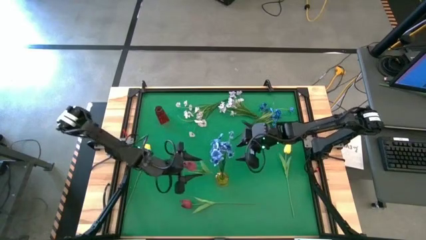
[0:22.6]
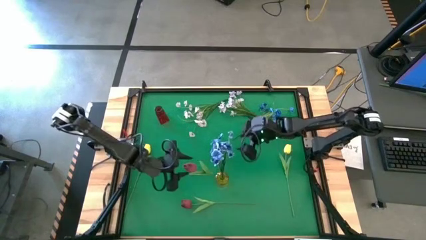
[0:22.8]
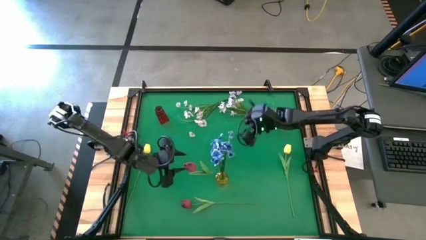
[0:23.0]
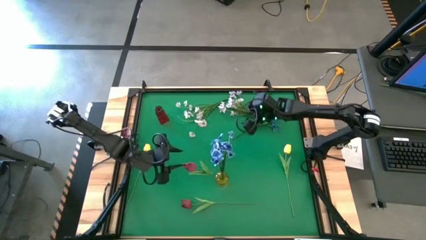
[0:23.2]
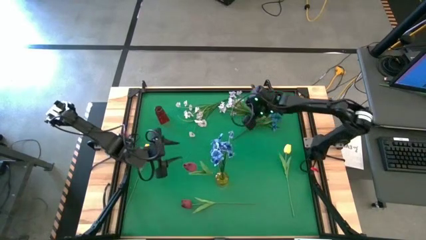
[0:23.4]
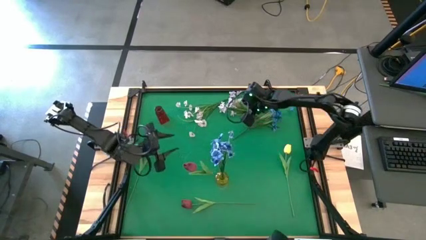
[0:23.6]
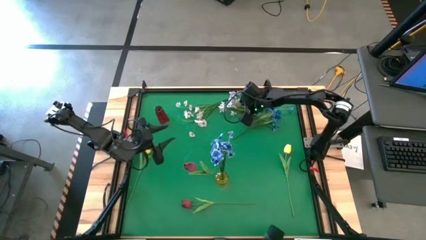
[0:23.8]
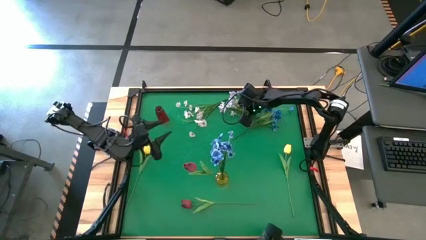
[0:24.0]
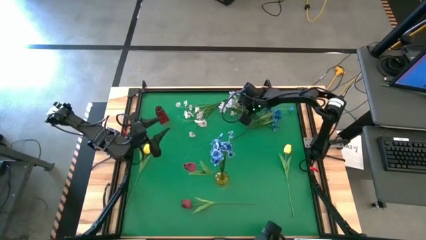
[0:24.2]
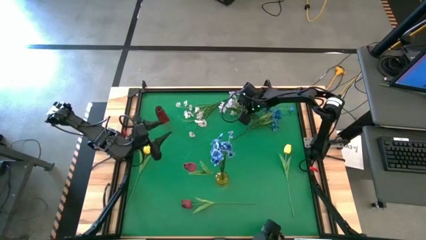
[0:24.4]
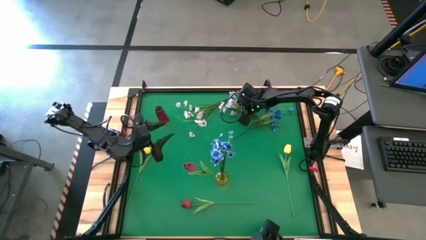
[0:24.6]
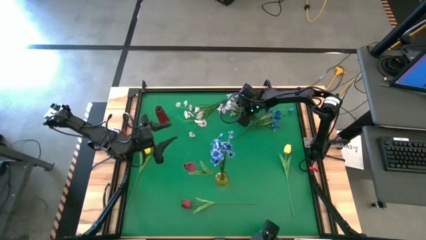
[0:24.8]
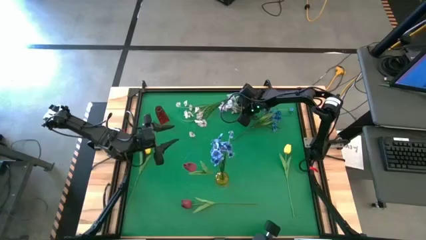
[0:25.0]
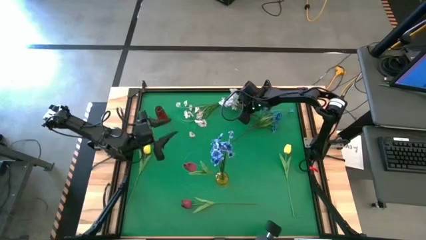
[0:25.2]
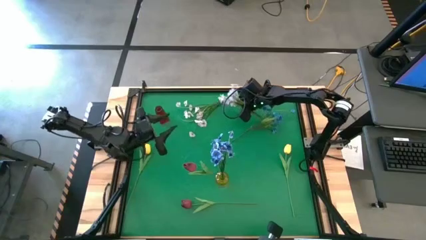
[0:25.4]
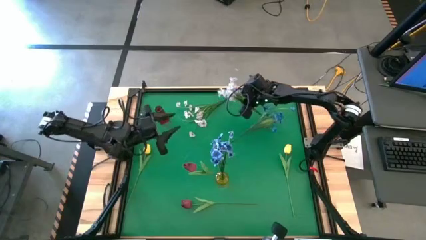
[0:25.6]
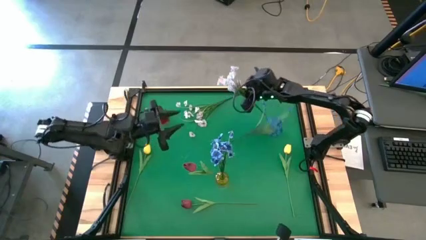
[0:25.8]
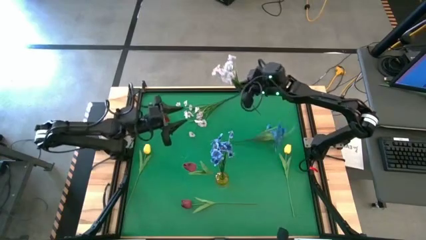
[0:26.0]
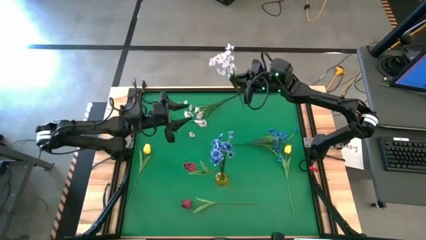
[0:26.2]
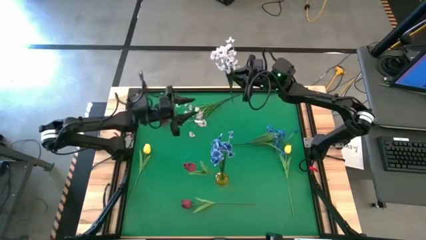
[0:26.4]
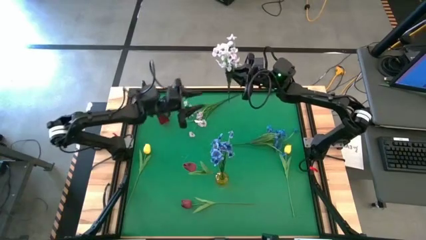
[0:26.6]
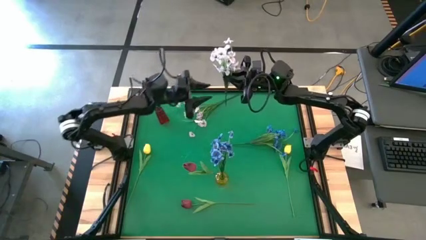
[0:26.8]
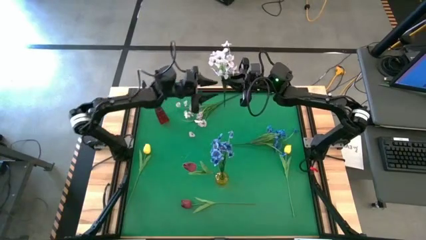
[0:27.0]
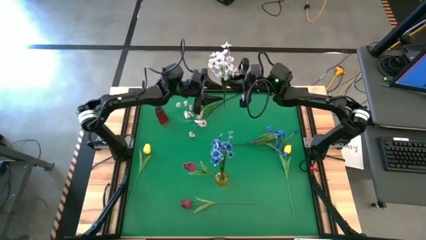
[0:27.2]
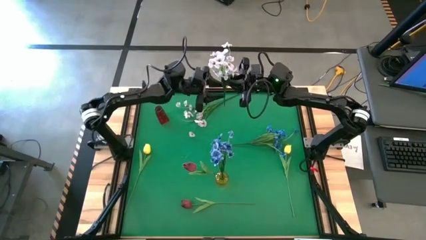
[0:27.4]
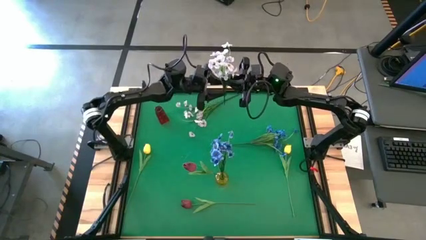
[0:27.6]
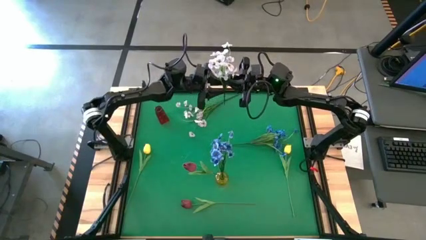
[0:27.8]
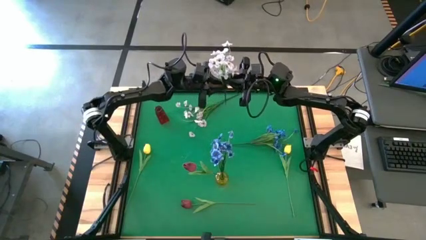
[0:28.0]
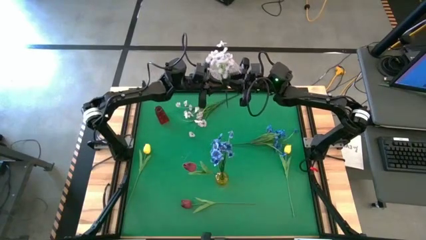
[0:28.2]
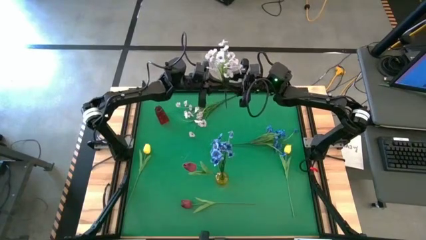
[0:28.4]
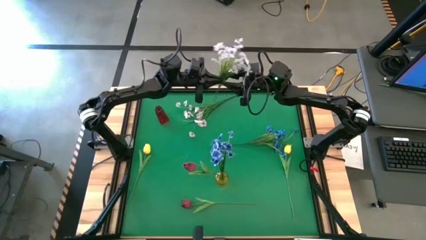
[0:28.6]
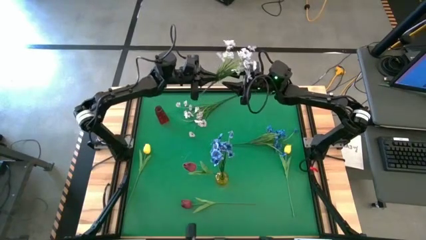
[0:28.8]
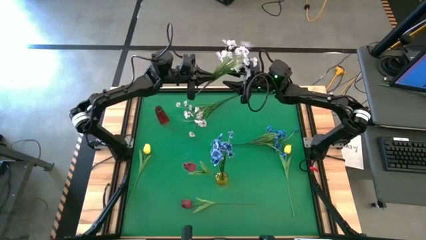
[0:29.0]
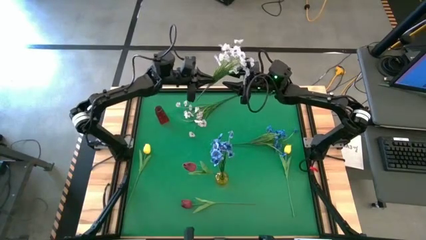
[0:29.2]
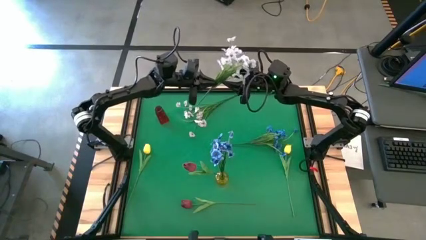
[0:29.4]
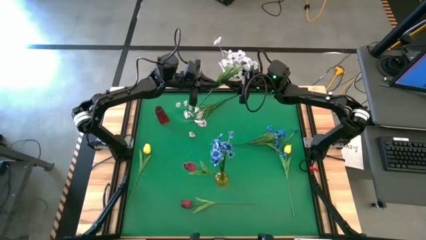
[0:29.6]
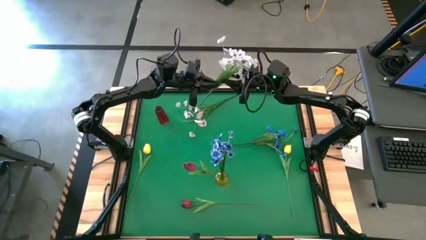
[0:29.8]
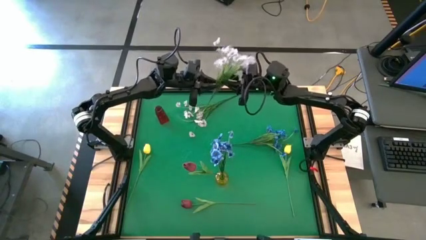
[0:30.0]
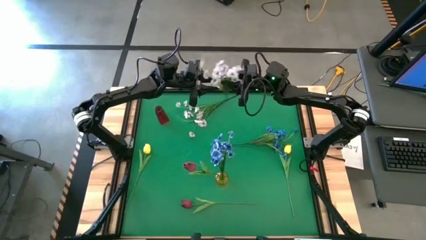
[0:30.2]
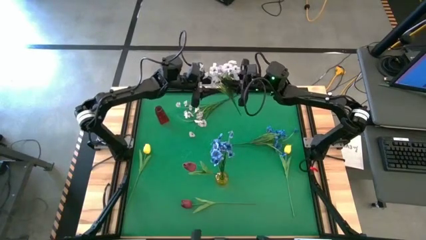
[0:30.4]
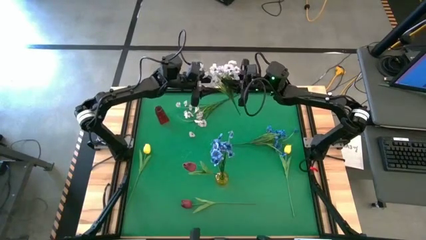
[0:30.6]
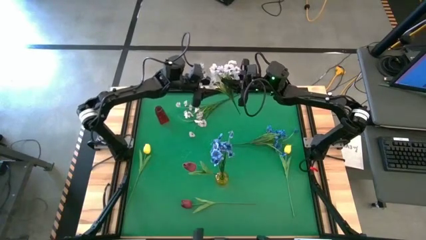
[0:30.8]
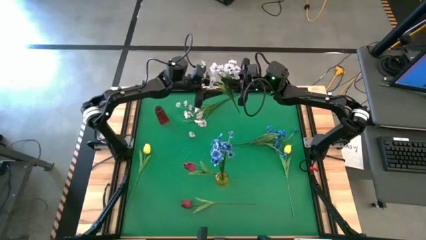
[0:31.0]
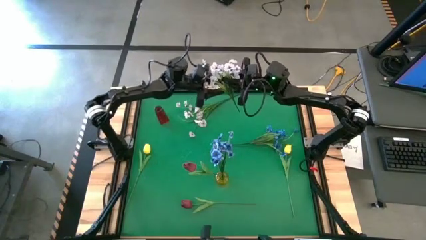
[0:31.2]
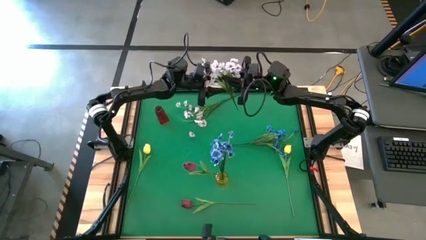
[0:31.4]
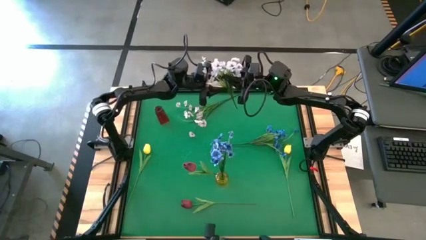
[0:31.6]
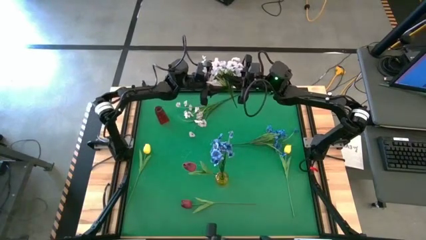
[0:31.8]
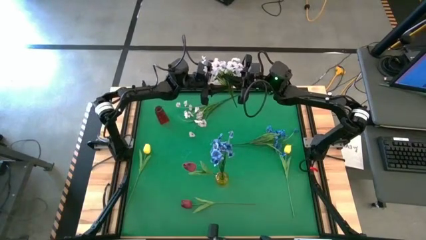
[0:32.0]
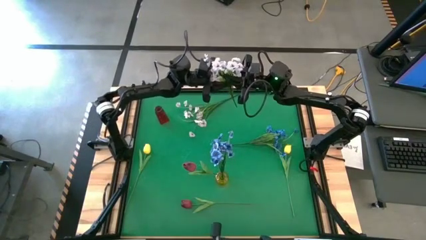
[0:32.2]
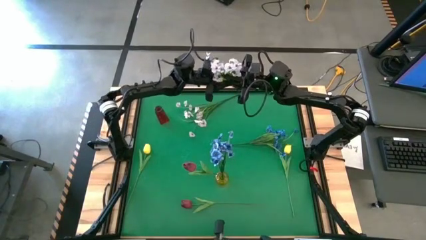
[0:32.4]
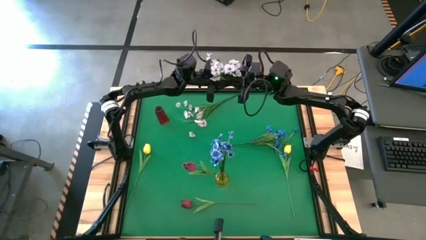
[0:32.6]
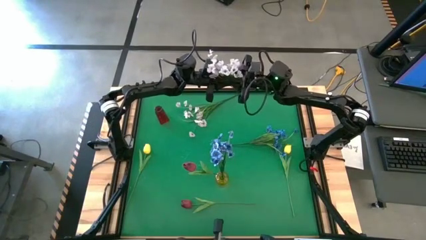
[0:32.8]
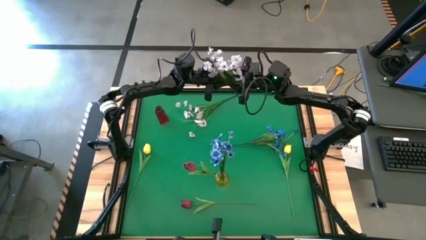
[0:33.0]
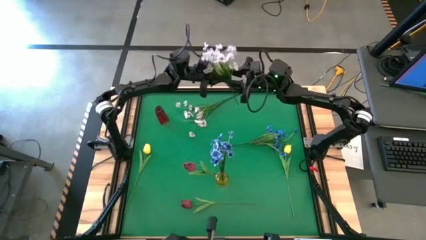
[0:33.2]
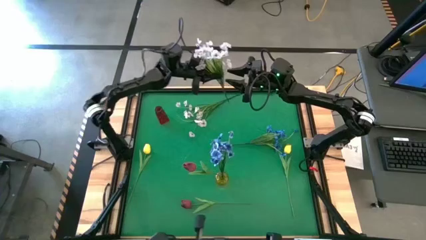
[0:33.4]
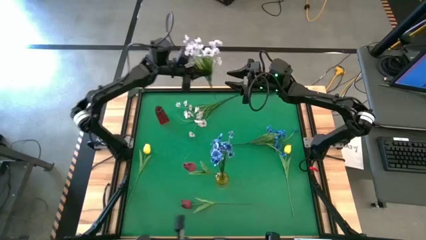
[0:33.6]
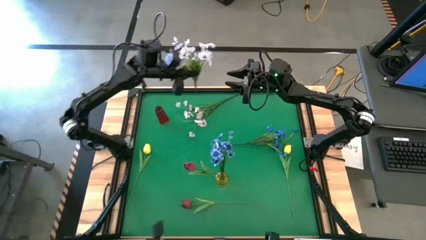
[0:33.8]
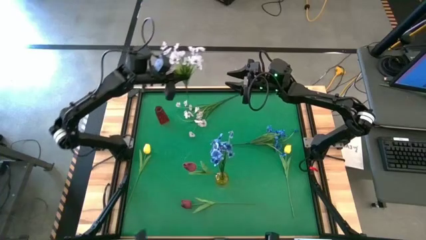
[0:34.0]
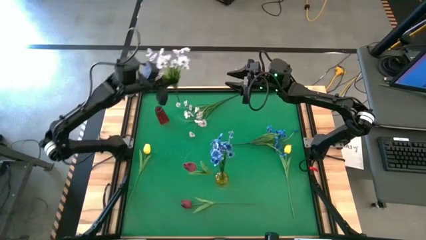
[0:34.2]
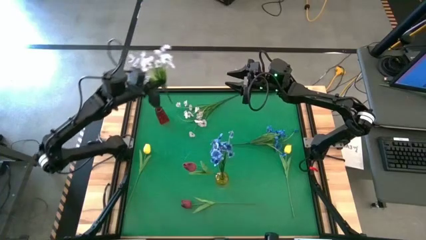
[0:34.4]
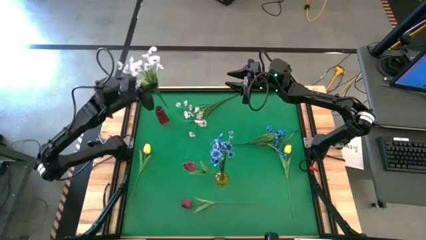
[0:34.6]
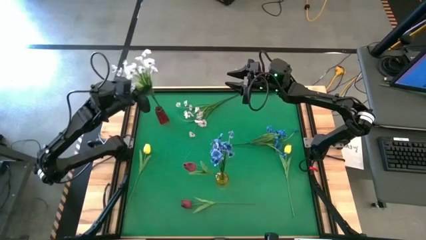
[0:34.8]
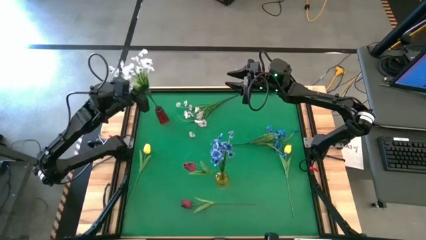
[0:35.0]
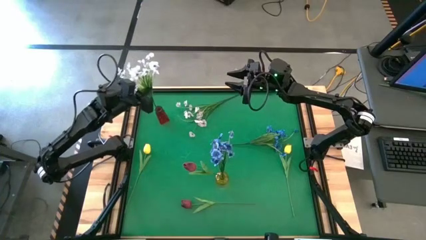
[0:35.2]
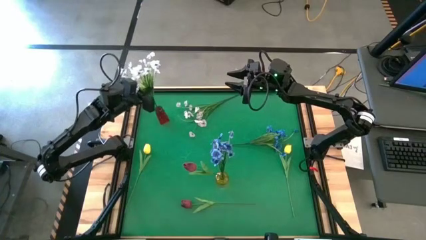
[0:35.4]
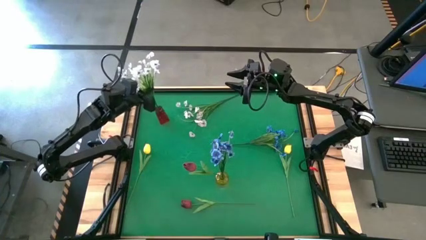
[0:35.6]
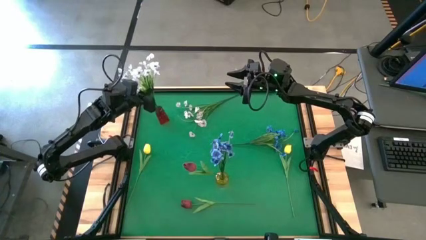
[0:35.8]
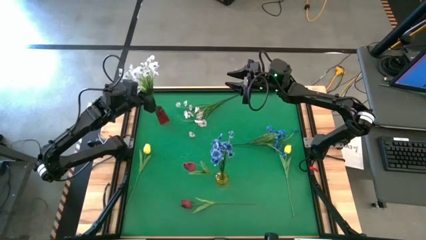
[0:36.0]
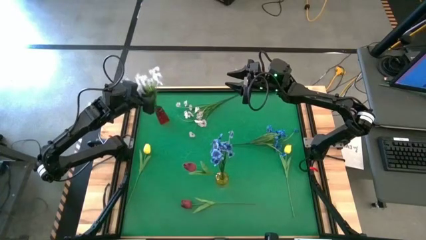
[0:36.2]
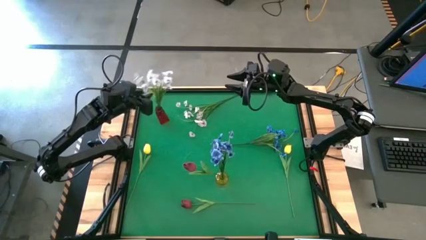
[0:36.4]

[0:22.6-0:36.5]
Task: Sort flowers into vase by color
Put the right white flowers into the red vase
